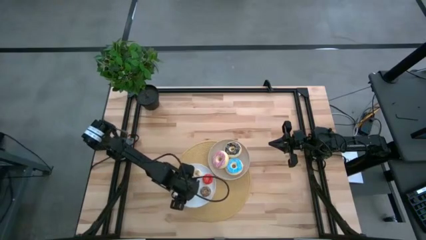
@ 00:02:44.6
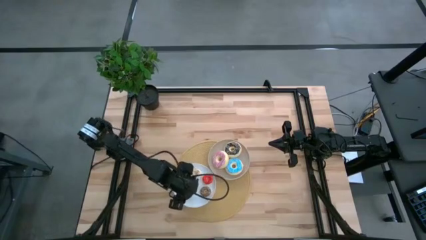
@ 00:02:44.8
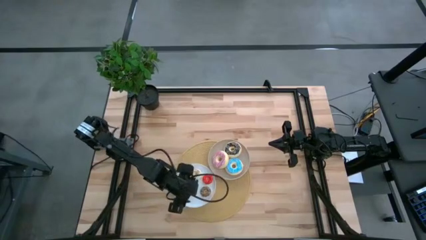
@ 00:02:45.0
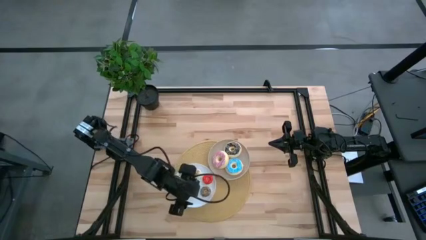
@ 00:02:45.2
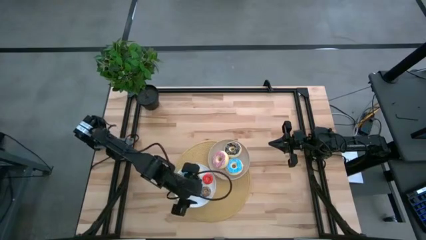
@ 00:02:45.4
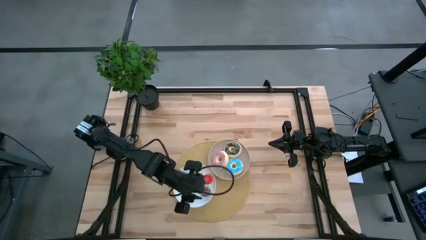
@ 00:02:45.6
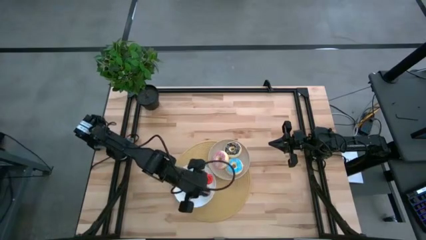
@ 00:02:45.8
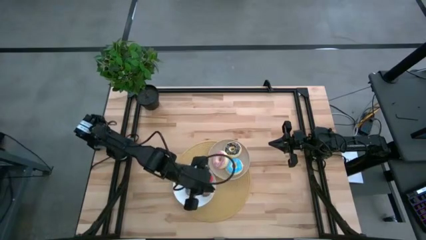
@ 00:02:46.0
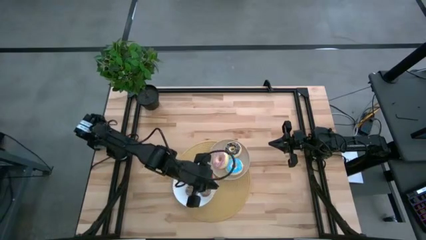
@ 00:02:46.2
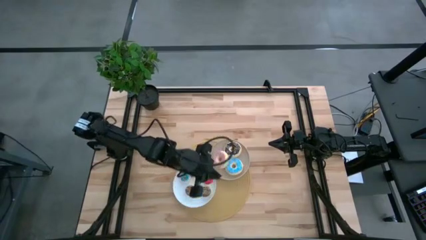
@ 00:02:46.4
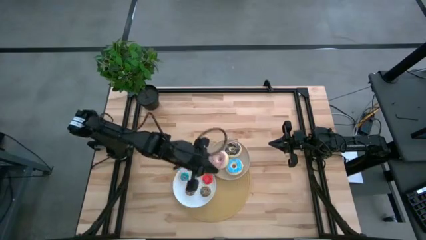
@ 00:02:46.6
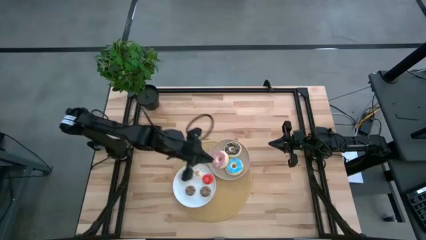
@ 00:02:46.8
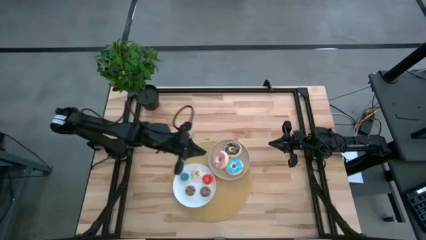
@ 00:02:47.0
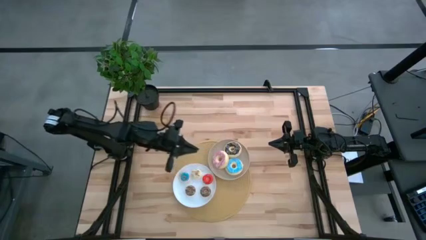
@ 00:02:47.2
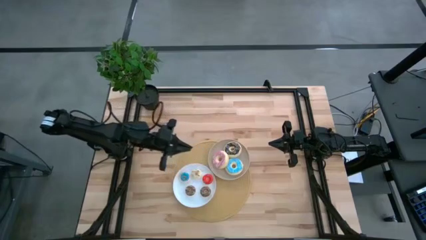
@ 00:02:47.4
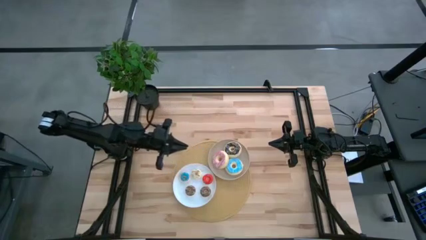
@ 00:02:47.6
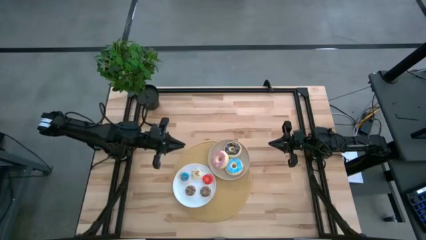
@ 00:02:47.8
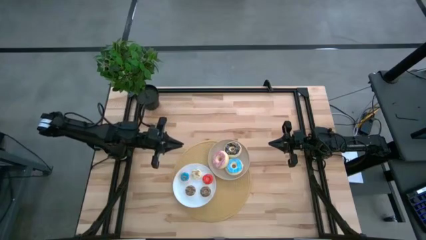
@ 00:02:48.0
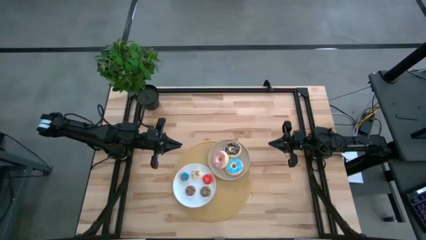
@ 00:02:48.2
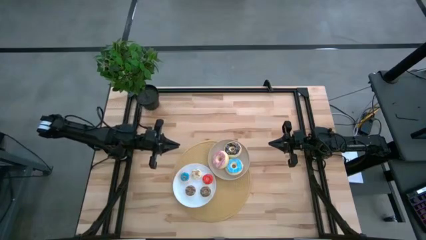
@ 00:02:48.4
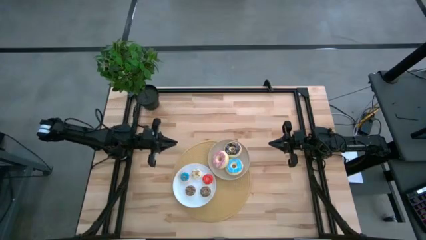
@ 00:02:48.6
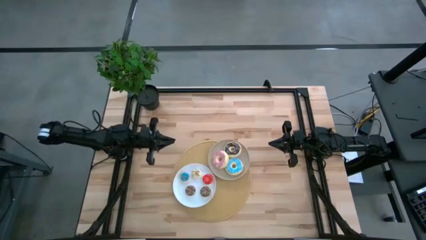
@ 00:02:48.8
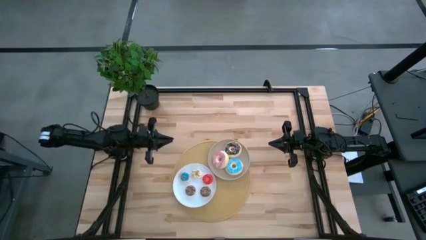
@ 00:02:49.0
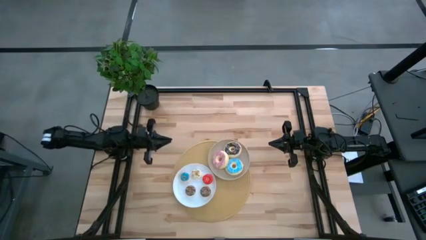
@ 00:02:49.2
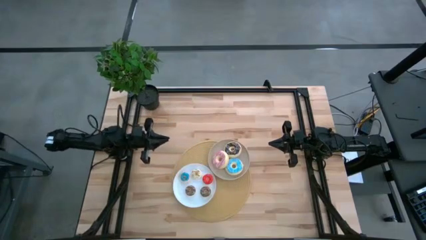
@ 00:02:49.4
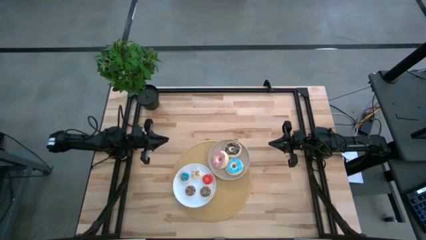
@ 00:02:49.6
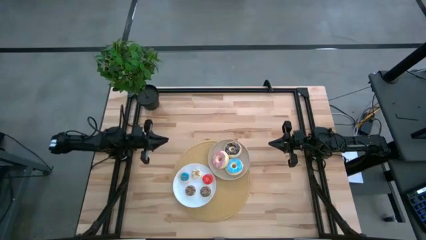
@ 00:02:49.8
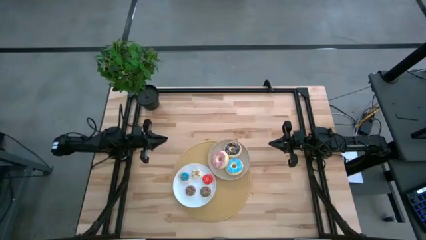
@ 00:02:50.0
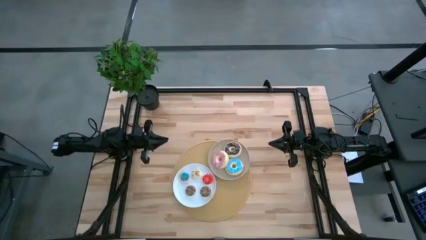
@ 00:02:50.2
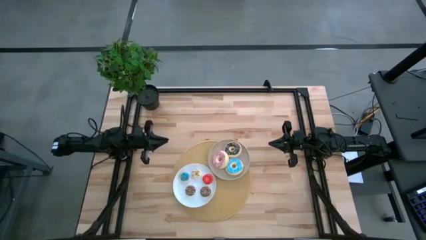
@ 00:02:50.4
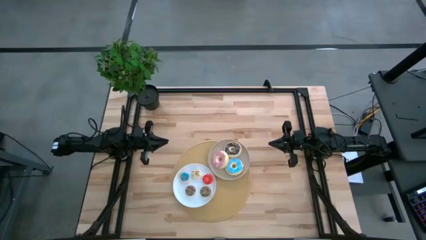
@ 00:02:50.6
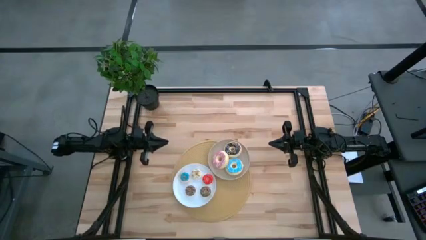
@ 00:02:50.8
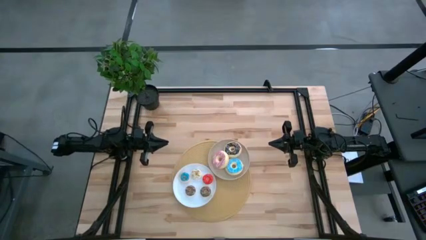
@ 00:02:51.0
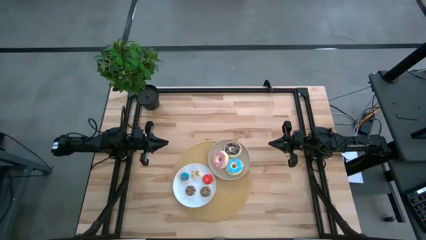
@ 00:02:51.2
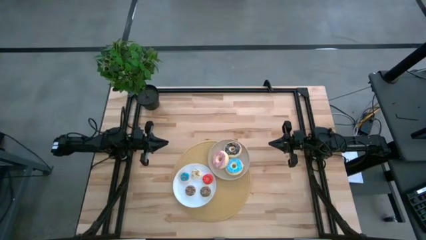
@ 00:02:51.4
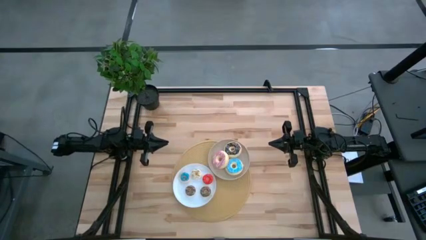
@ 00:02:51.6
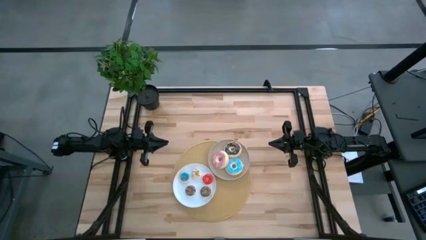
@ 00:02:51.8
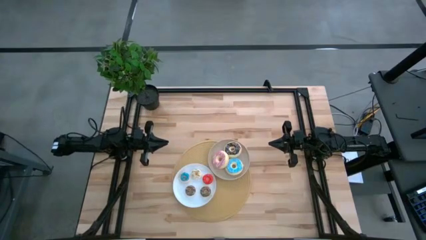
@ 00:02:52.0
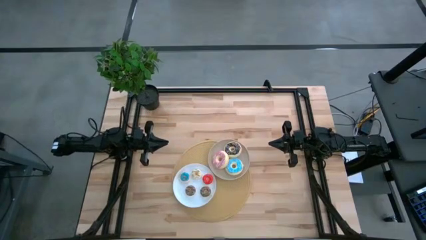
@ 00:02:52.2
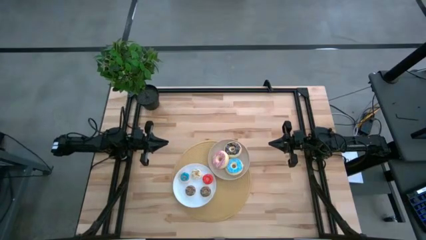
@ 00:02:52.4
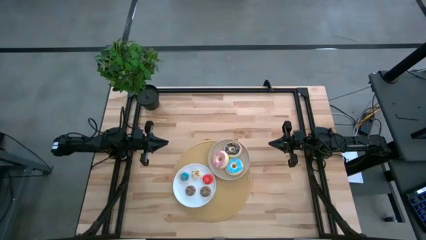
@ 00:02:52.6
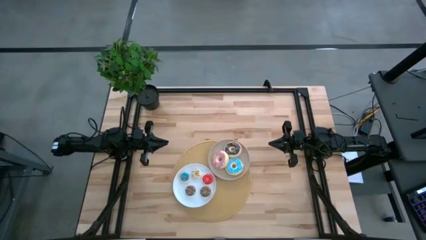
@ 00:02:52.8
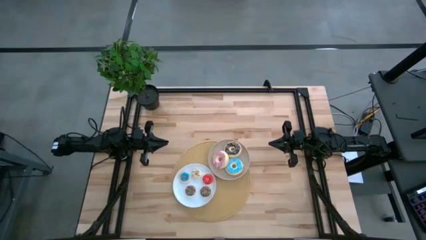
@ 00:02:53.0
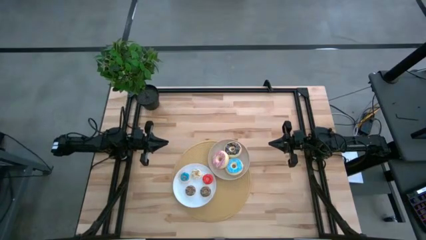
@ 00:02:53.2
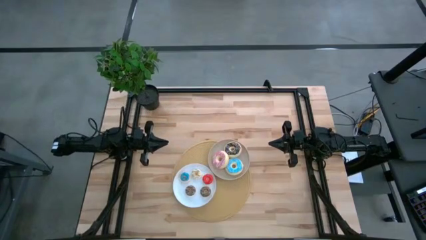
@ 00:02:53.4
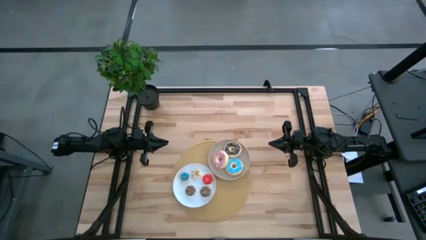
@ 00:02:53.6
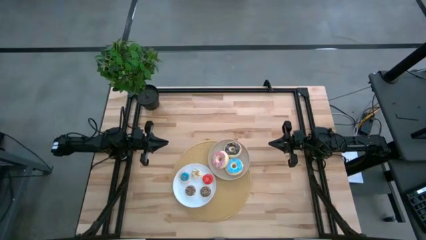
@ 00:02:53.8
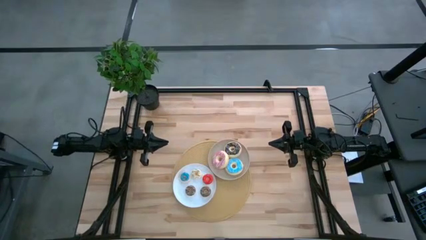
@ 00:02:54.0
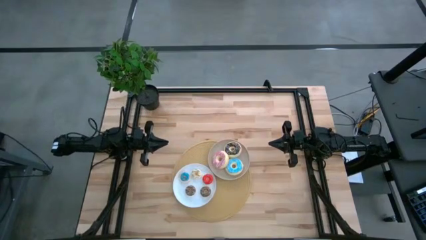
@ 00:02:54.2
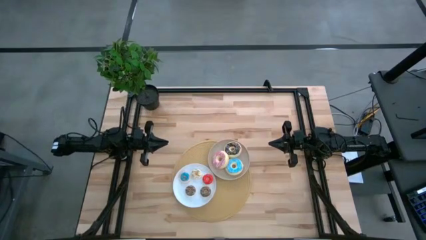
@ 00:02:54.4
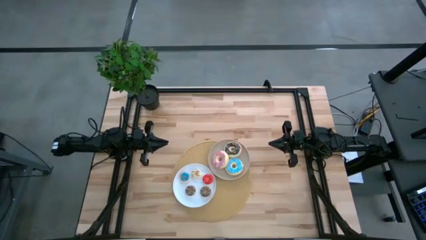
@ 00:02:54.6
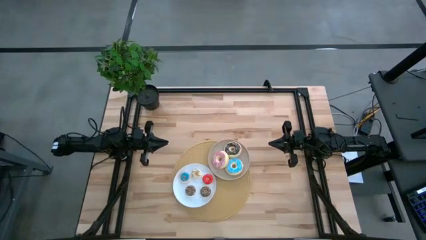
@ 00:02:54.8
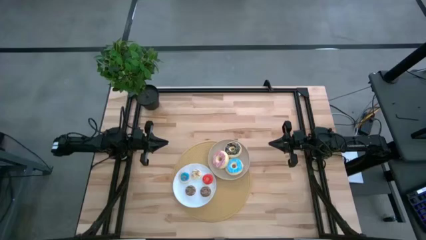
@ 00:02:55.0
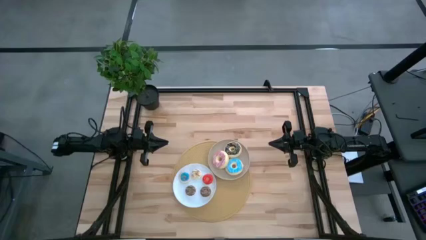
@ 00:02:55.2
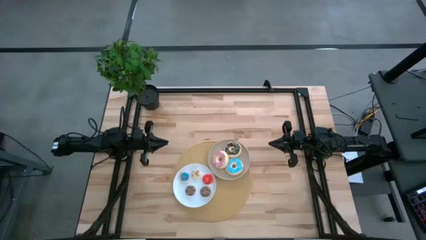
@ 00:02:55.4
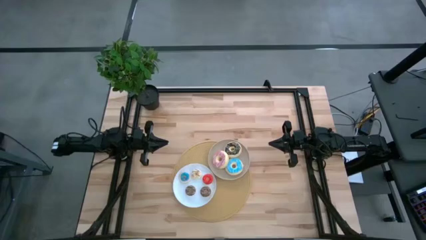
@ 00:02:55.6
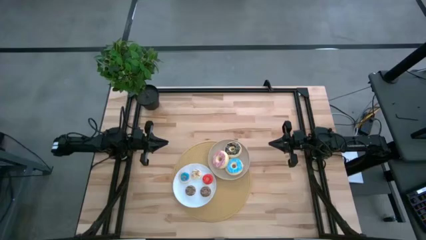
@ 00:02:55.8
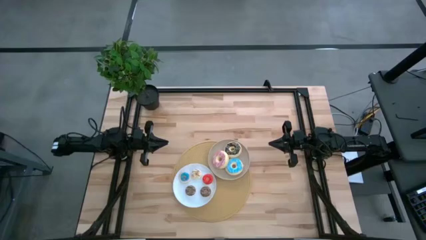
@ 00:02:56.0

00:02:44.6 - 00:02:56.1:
Task: Pick & Place donuts
Return to Home Position

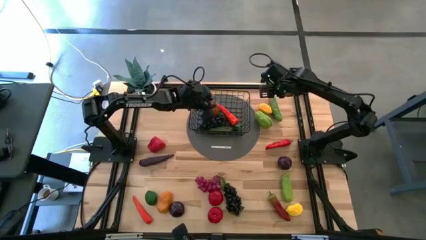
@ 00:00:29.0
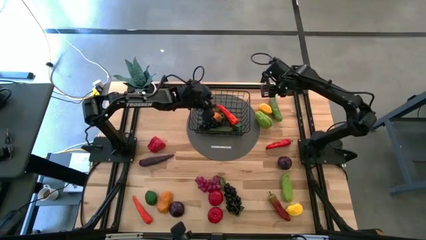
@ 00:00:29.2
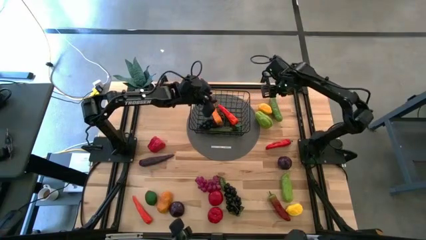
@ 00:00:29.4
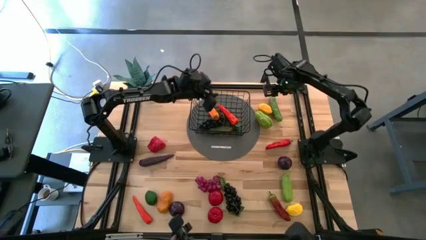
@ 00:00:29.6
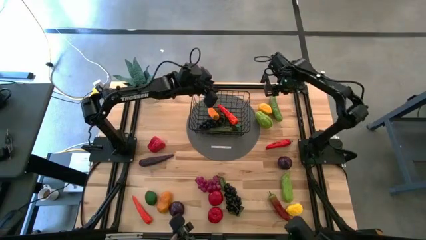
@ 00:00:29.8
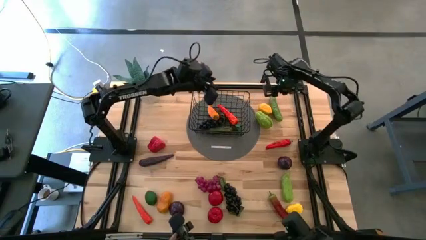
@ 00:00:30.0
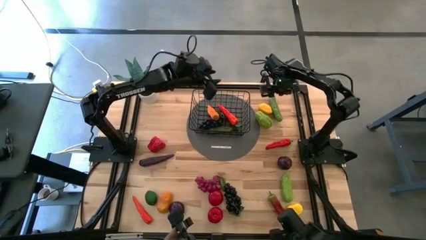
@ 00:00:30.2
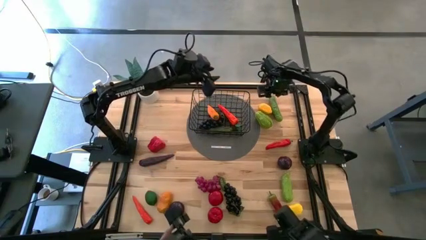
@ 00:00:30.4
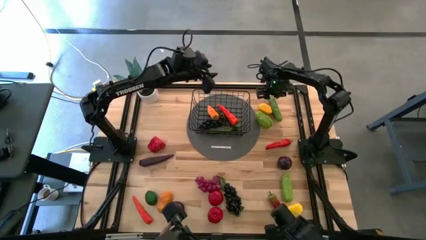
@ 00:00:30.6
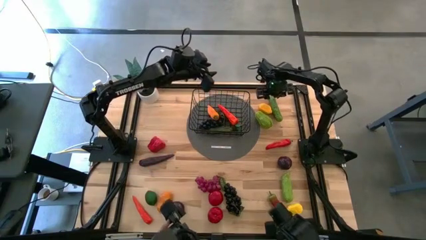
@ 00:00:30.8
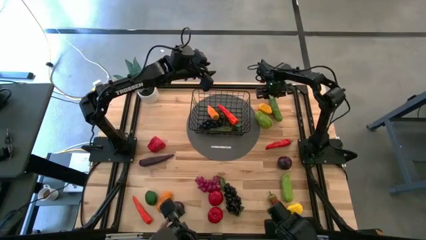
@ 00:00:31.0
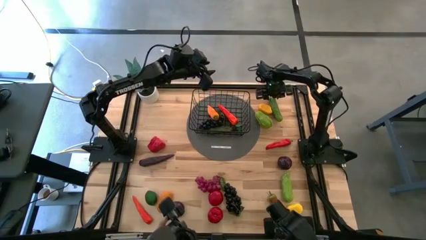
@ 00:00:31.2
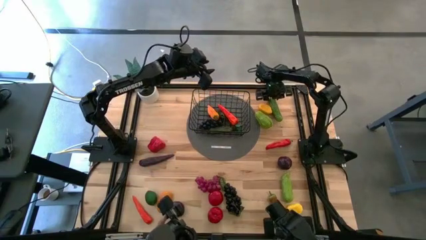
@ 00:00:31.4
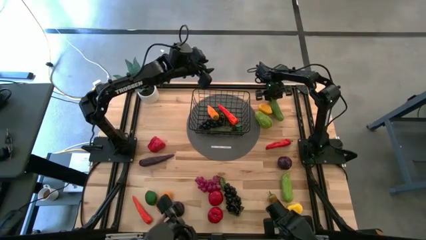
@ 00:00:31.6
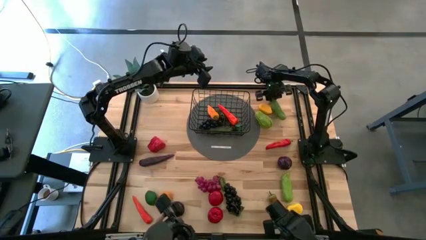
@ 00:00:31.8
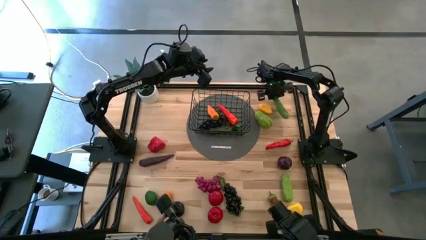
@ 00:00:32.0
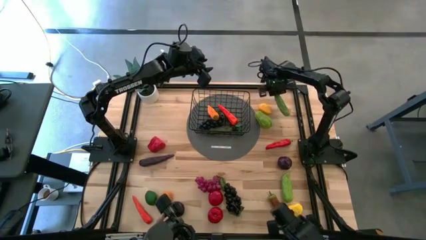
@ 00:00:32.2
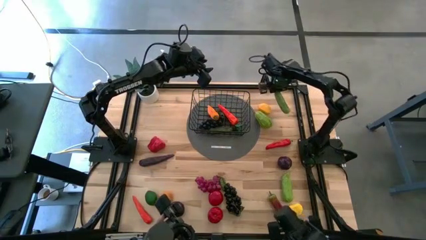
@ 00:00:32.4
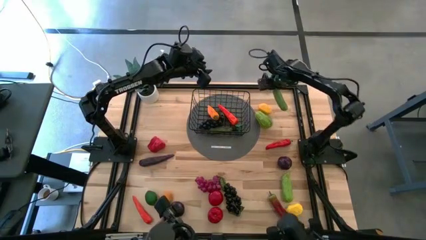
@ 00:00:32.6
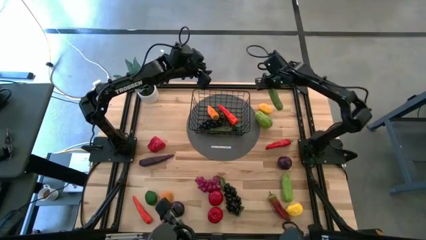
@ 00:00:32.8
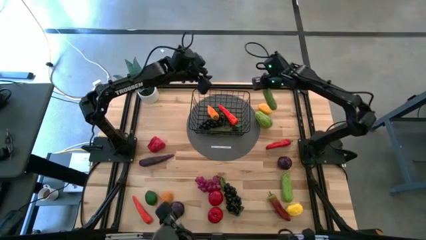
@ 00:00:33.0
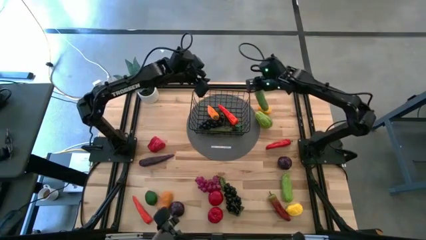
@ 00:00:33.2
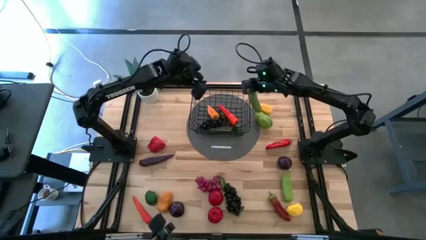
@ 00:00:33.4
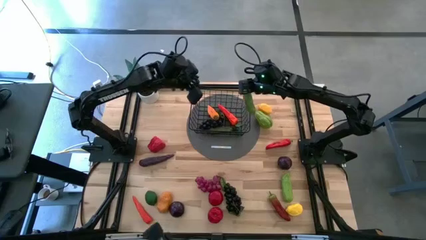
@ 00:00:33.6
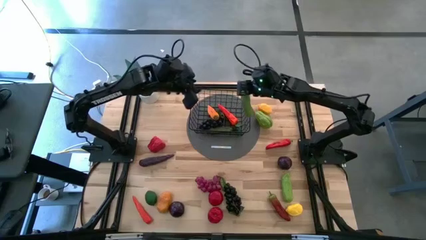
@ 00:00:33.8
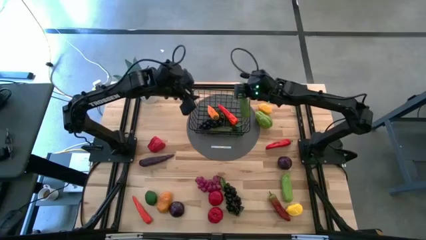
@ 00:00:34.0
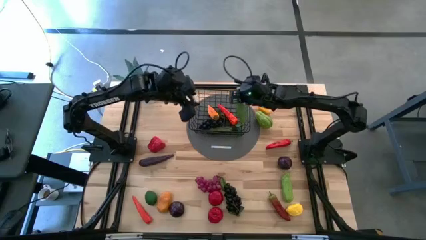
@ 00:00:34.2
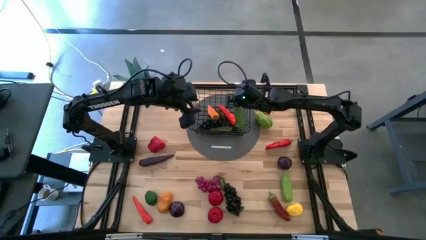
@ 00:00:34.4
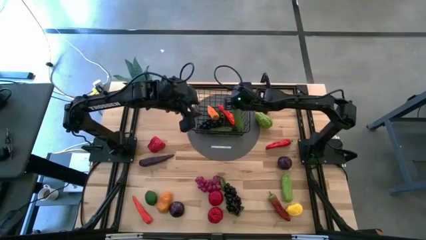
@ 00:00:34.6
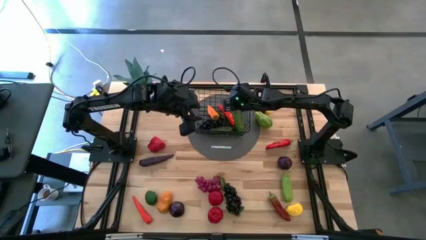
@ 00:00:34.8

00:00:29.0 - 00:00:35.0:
Task: Build produce basket
Put the top cucumber into the wire basket
